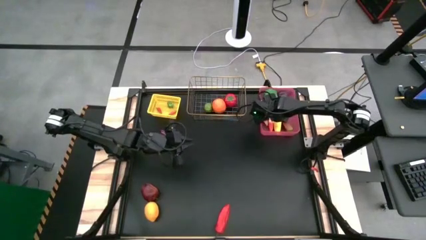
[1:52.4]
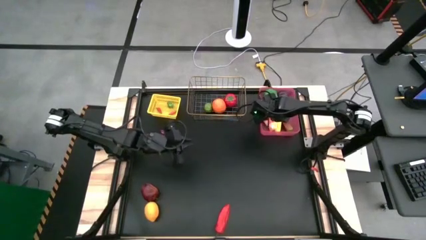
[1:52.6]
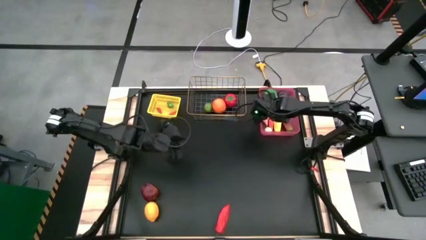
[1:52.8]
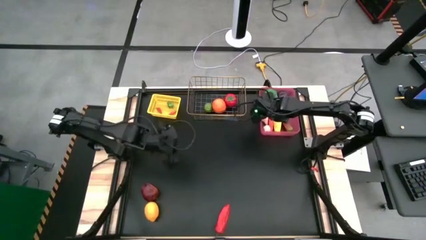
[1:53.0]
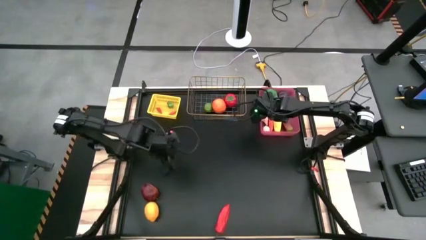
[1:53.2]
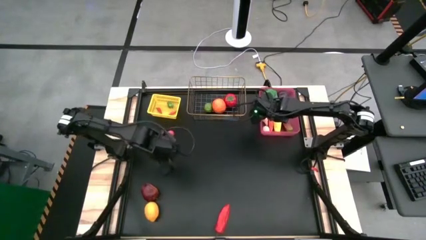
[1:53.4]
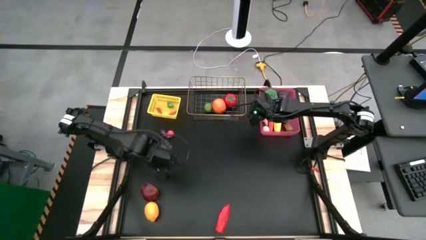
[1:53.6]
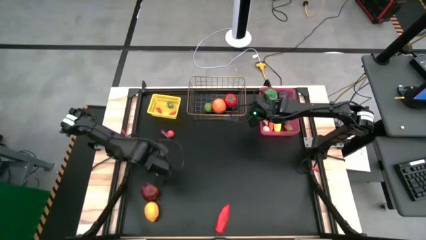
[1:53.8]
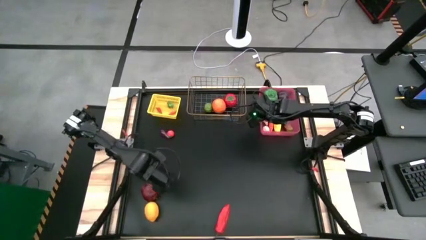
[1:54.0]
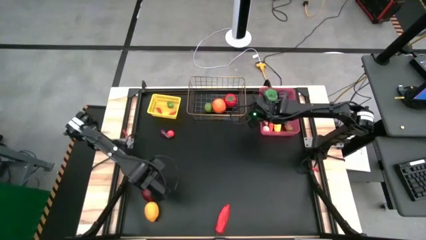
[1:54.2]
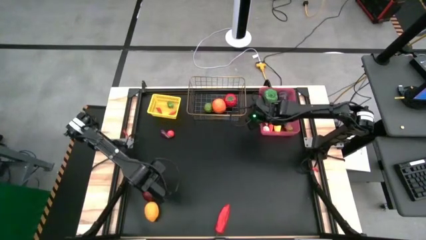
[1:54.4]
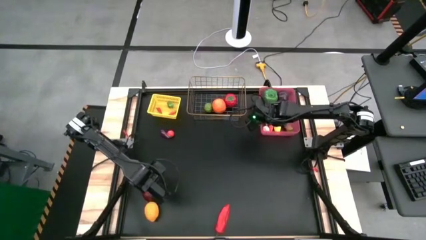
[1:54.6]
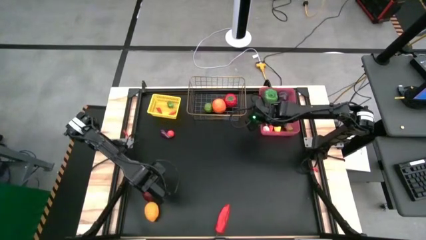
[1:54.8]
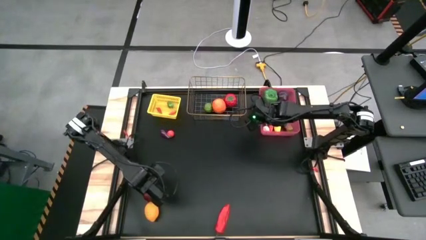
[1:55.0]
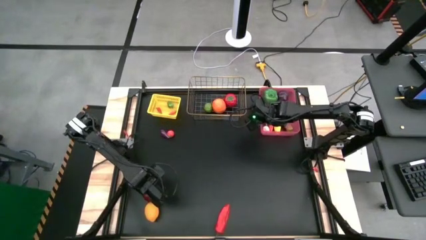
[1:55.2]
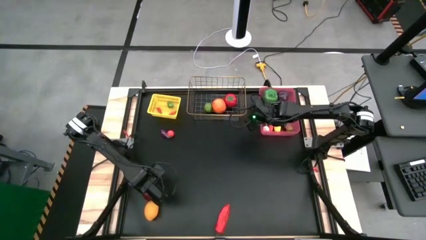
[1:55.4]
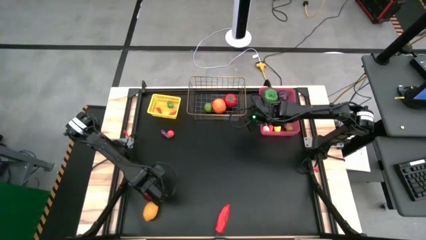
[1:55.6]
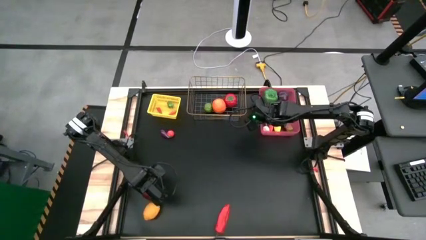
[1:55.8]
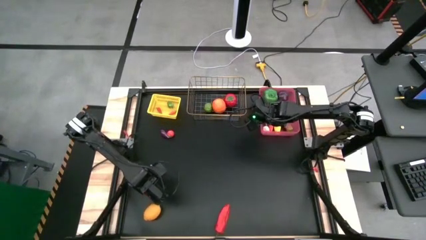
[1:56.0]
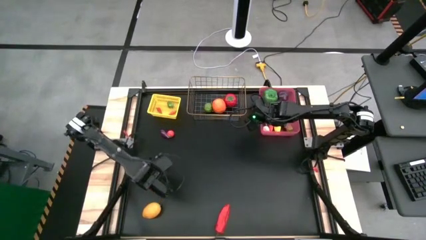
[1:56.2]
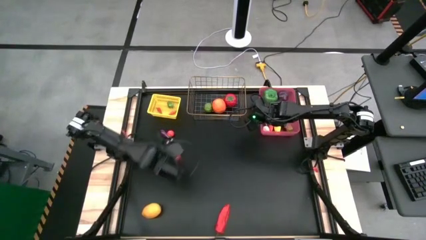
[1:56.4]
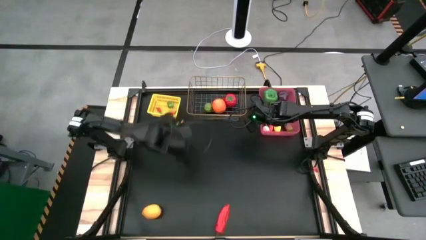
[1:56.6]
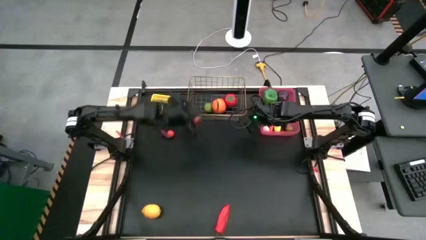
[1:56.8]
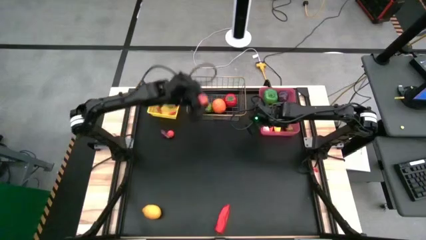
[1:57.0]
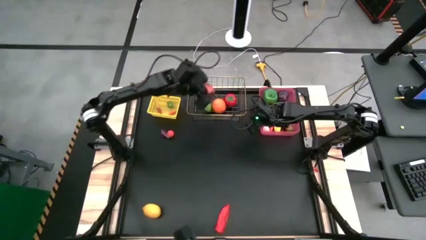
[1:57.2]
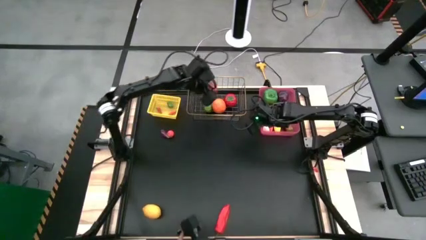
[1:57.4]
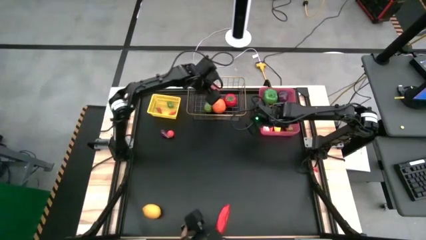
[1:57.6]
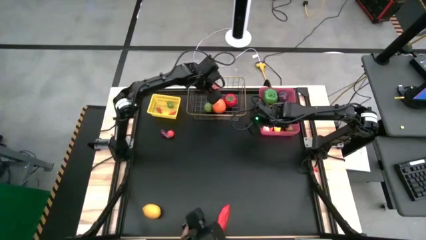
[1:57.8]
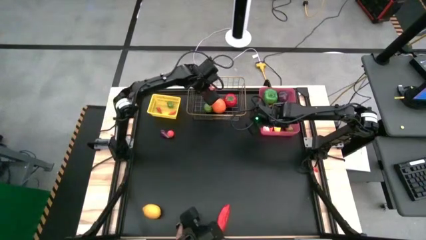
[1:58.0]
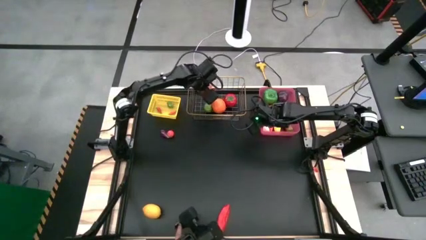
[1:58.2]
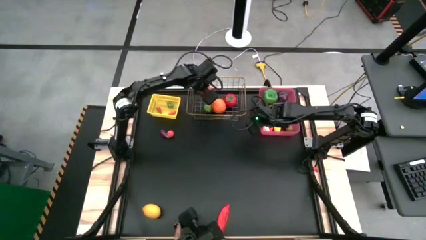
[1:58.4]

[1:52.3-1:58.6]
Task: Sort produce into baskets
Put the red apple into the gold wire basket

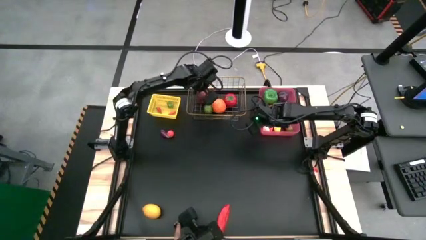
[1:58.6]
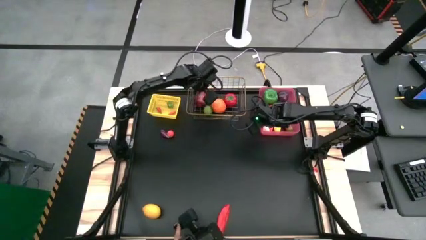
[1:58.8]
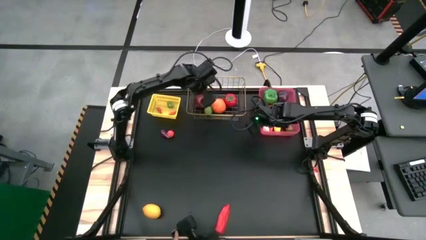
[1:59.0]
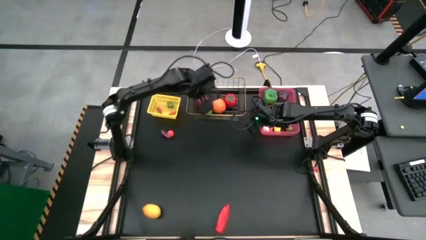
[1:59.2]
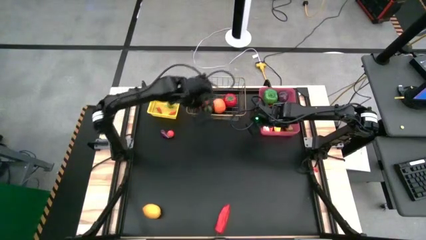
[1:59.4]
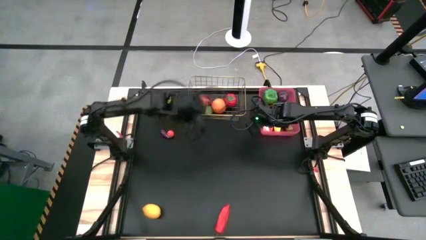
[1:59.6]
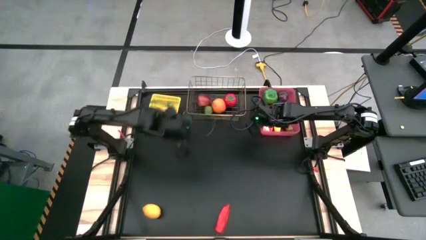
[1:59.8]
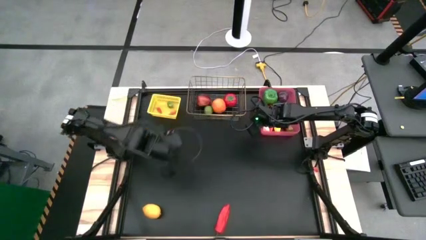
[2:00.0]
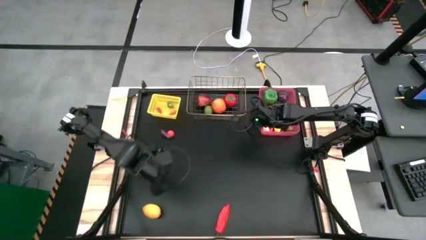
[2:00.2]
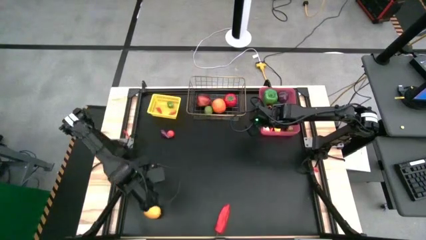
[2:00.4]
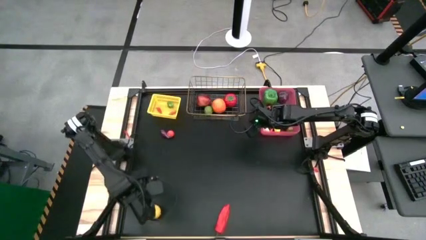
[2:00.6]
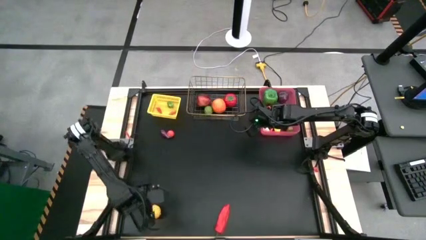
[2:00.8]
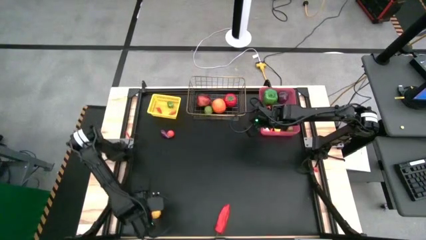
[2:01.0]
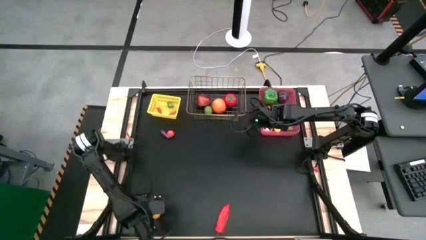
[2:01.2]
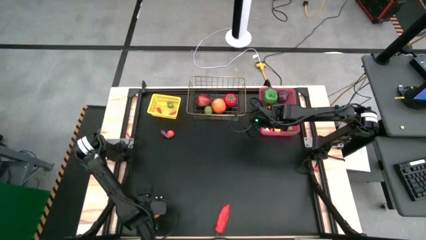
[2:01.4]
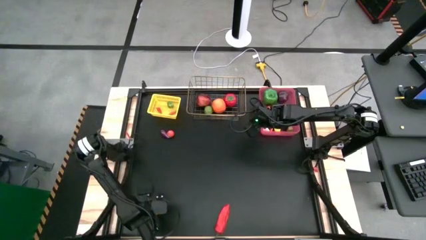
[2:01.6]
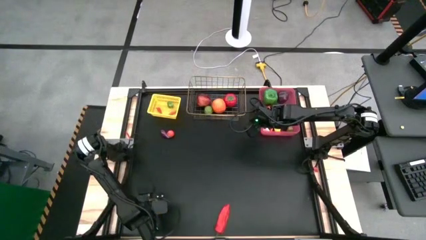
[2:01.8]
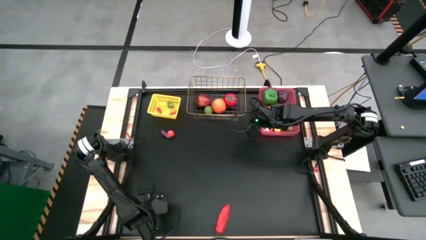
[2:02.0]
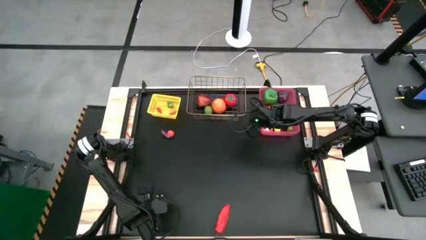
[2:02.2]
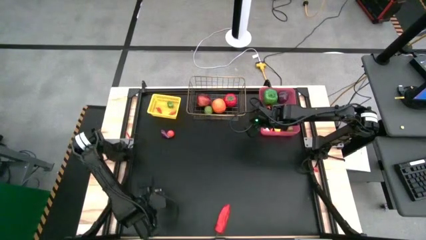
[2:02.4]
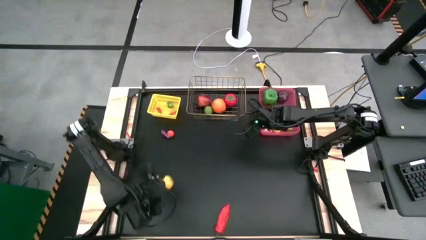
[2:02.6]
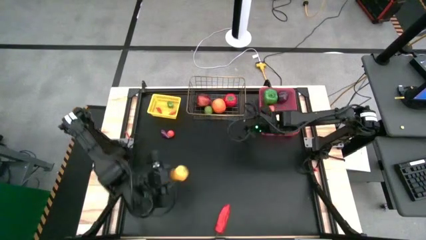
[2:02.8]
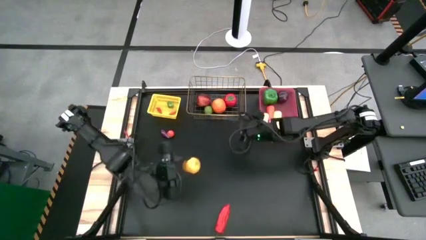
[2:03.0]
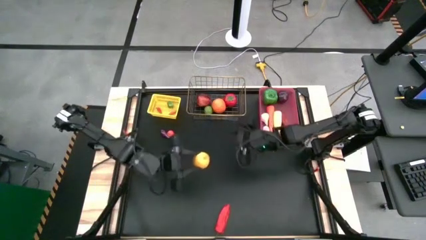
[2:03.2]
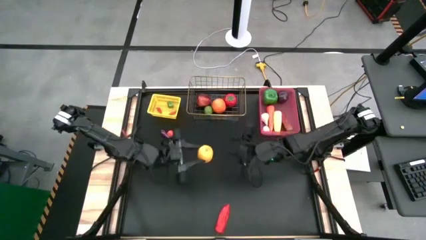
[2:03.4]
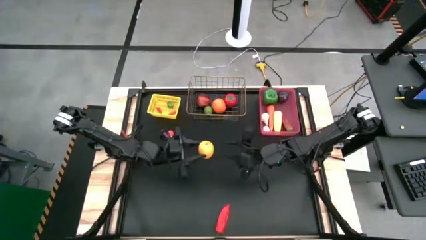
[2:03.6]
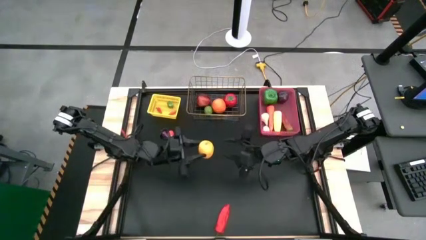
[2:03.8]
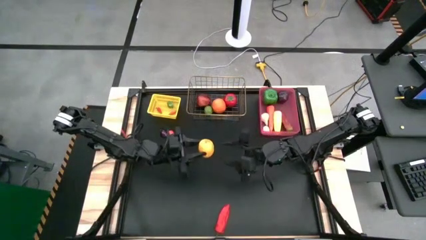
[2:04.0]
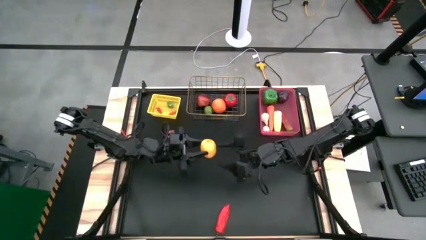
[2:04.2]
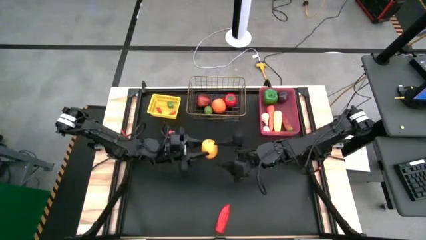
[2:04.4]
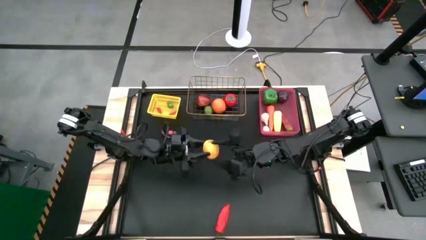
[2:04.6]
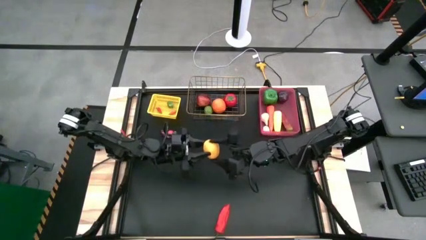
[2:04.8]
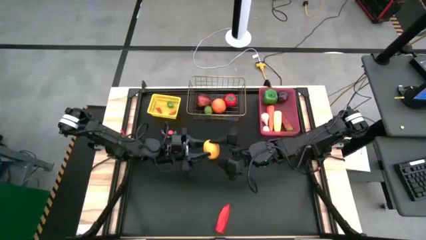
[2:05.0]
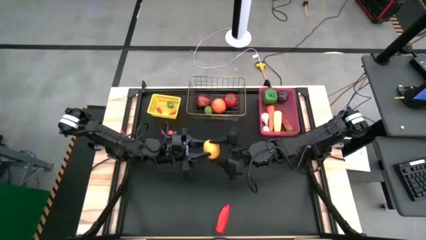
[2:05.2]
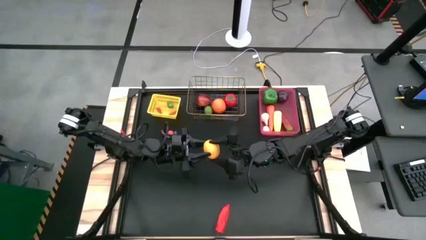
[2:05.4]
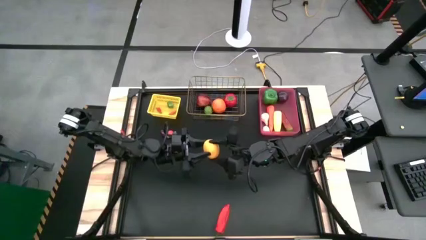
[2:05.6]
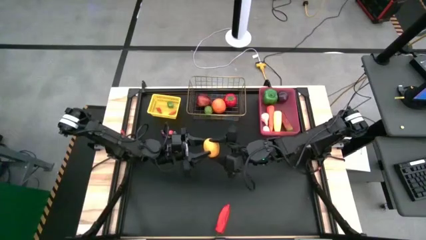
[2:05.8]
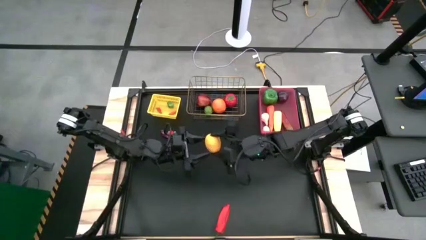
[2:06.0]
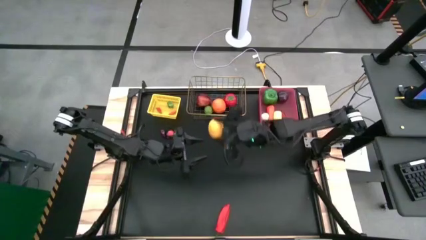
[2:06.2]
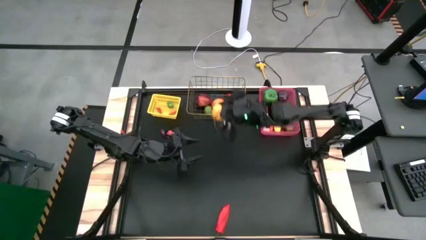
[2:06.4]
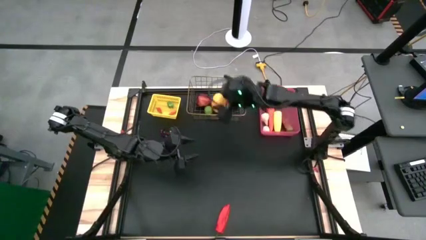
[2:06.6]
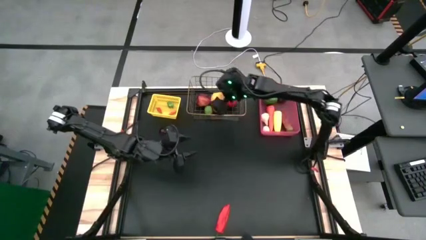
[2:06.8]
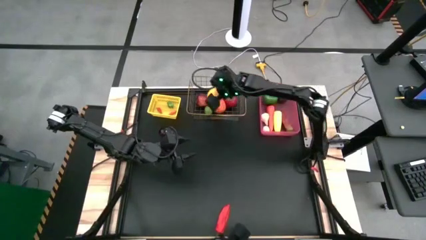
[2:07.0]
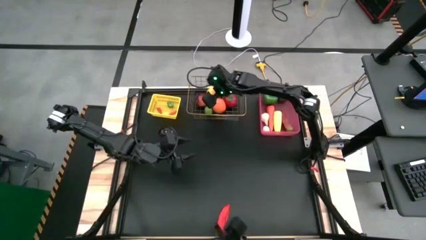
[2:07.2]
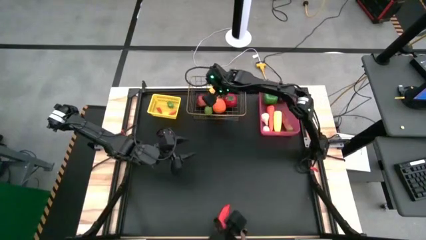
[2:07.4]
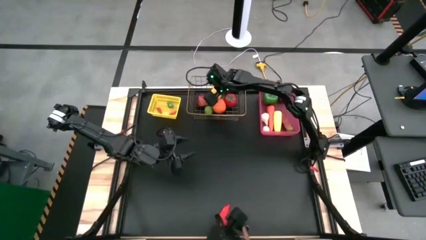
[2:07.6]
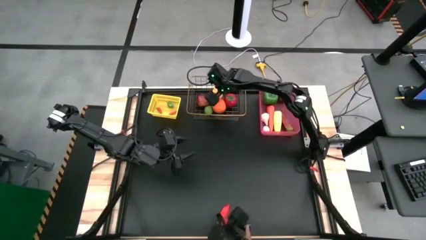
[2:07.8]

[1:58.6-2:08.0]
Put the yellow lemon into the gold wire basket
